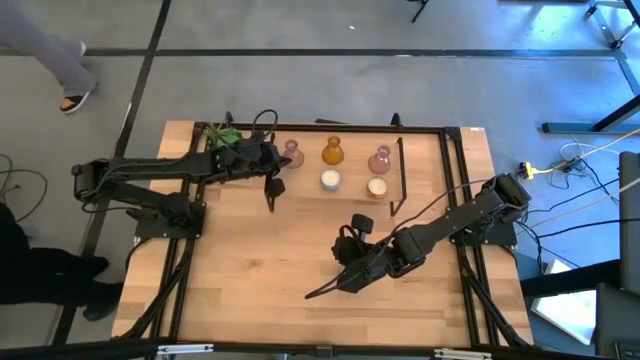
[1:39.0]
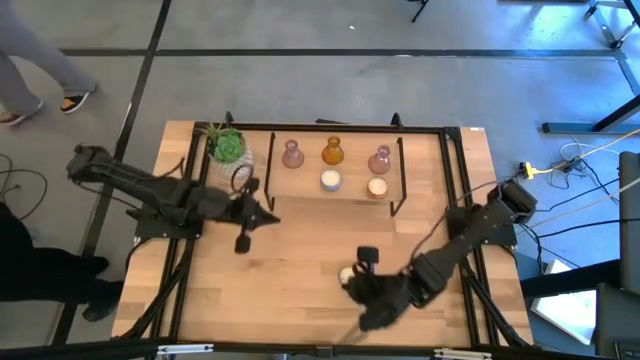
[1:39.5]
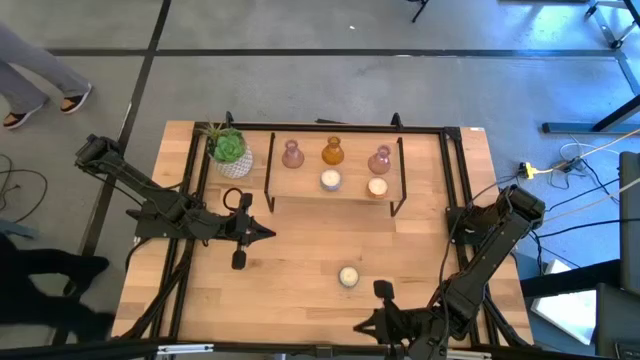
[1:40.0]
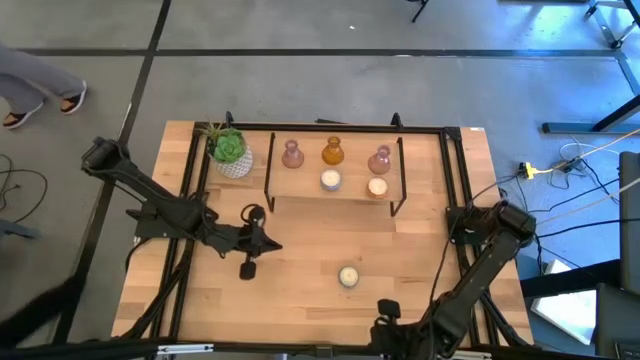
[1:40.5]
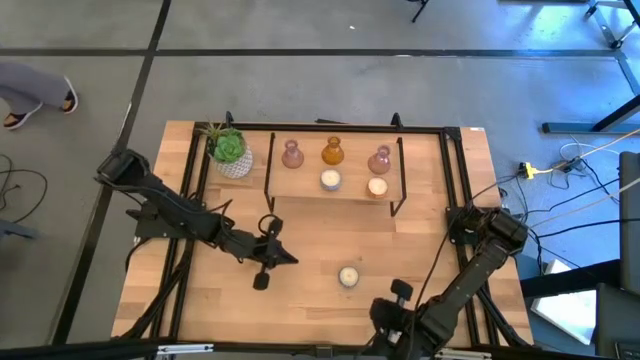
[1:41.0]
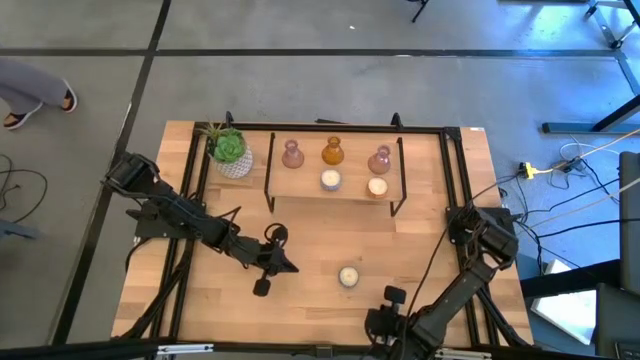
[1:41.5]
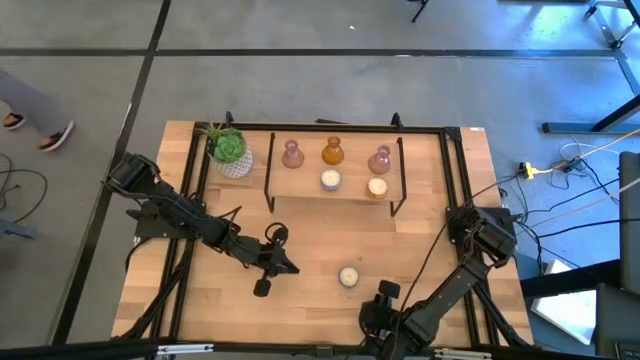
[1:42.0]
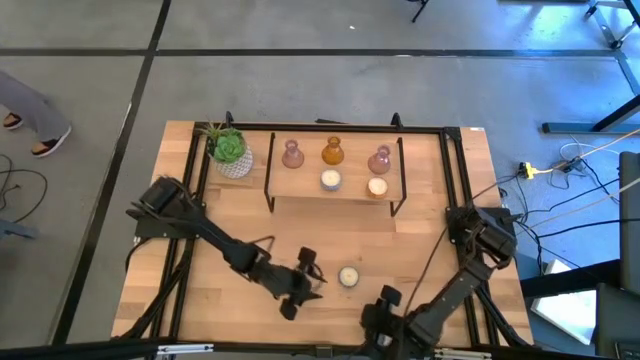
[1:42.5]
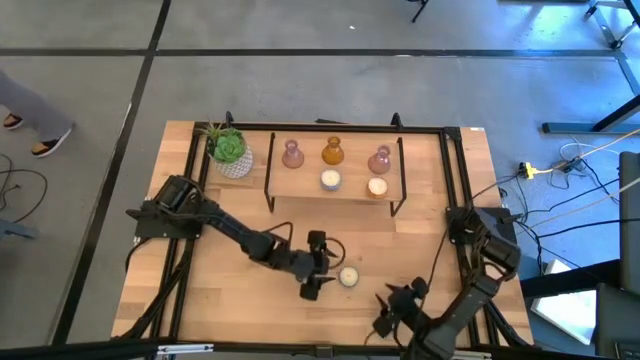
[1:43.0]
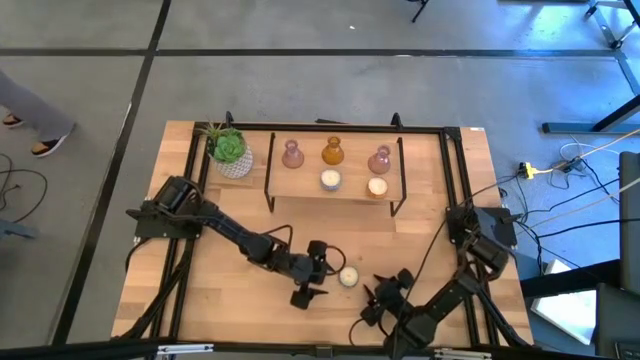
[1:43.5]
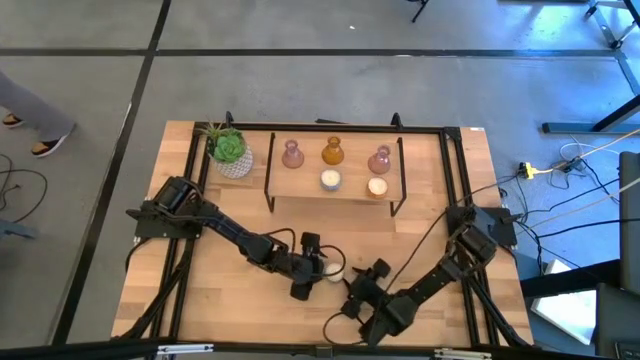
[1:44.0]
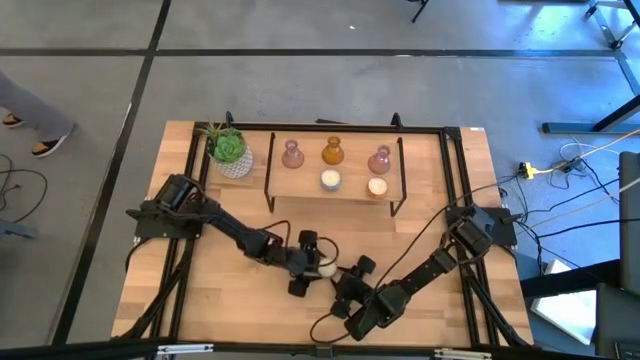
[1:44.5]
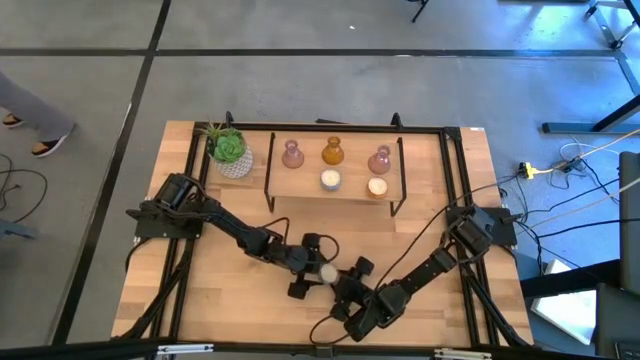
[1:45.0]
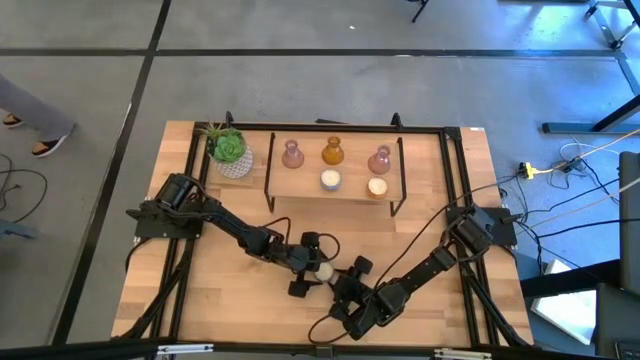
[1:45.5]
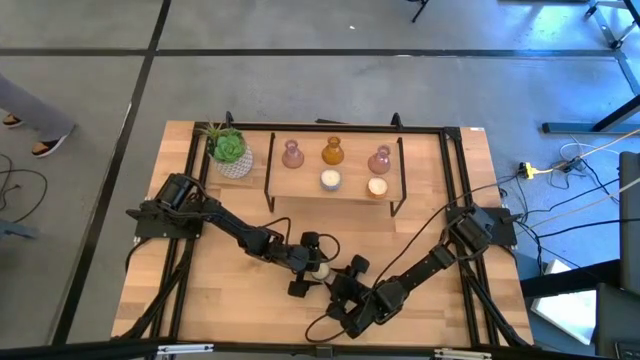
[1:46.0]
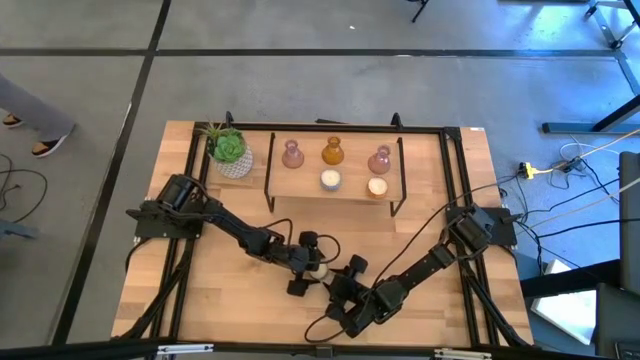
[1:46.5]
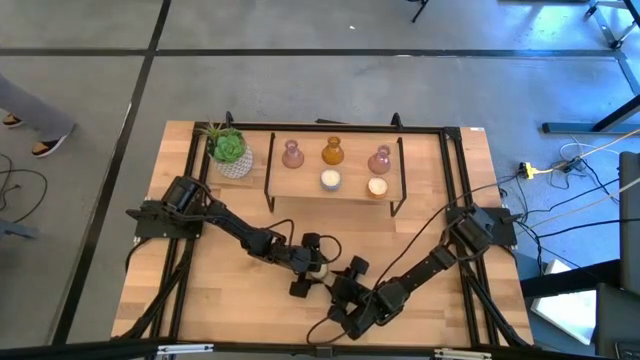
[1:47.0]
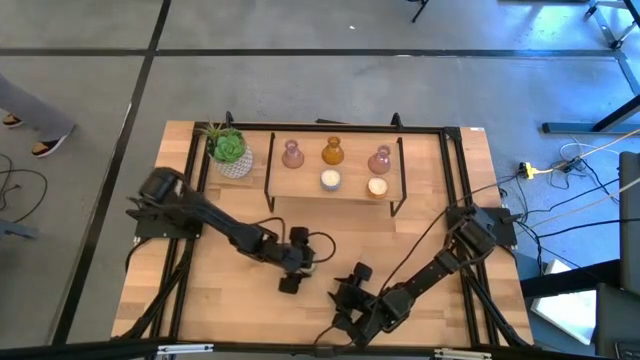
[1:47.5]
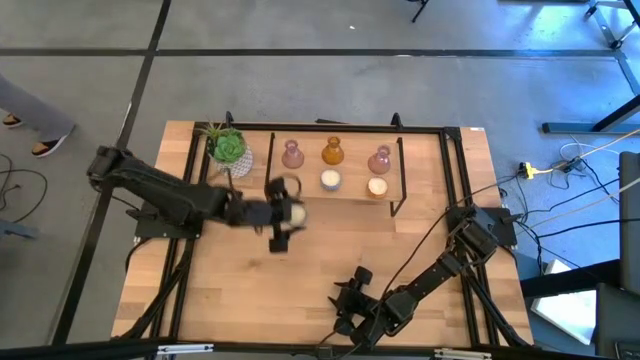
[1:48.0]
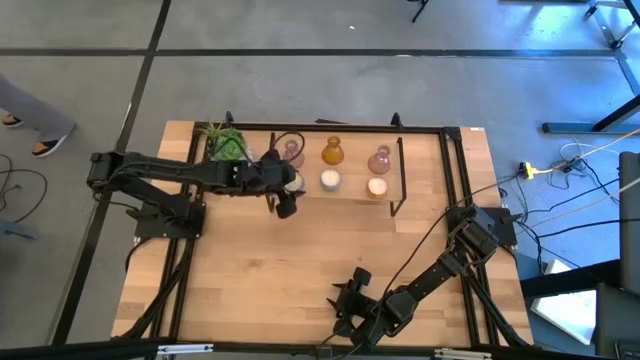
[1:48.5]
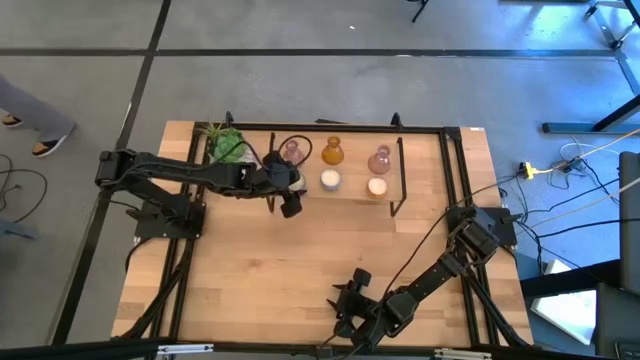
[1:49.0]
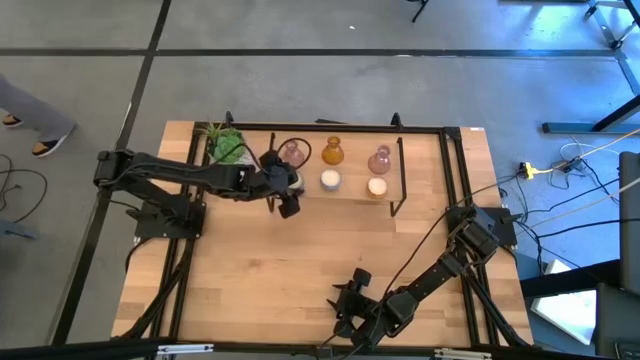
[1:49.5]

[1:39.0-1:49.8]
Task: Pick & Place candle stick holders
Put the blue scented candle on the shelf aligned with the light blue and blue scented candles

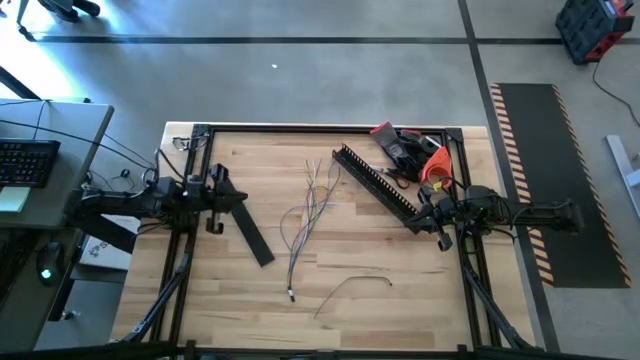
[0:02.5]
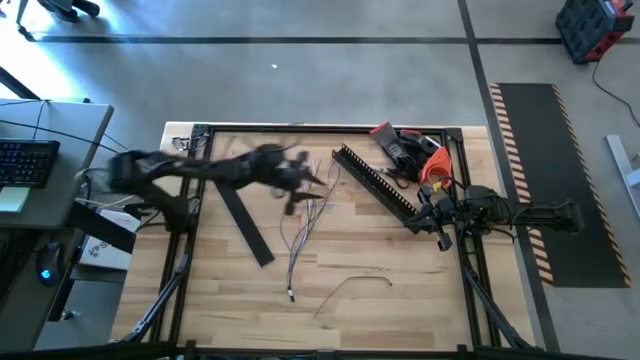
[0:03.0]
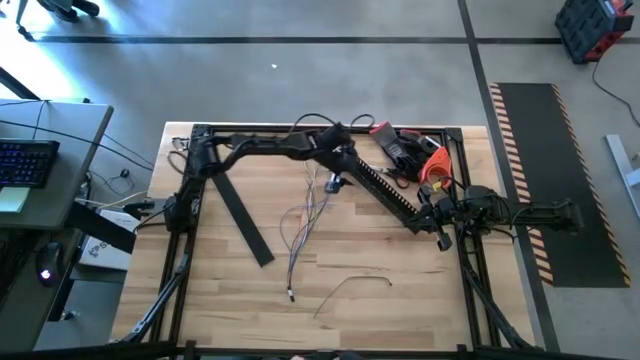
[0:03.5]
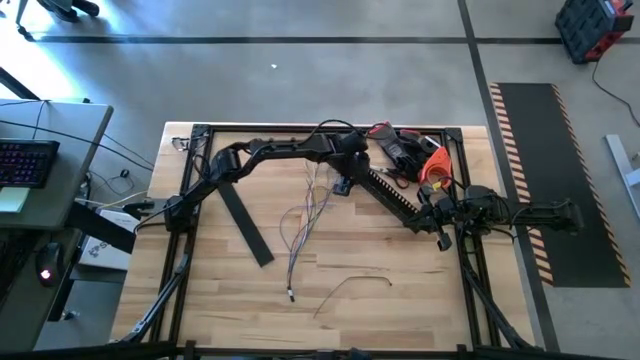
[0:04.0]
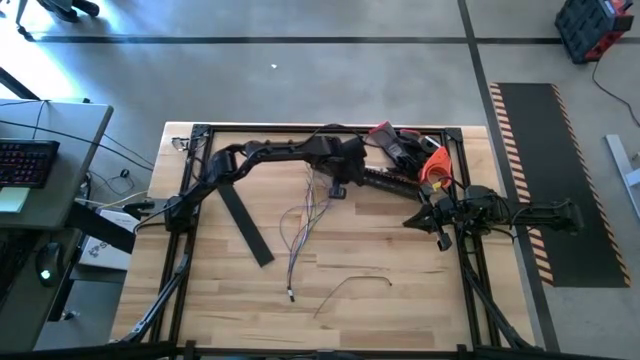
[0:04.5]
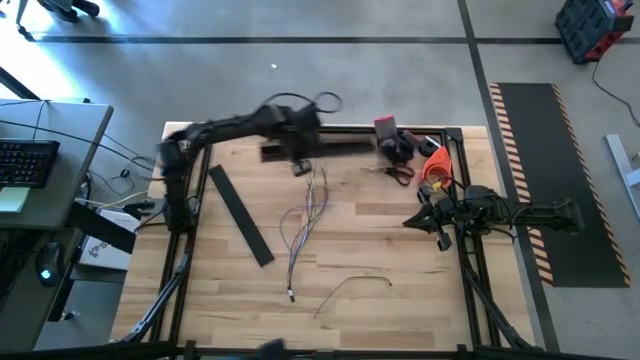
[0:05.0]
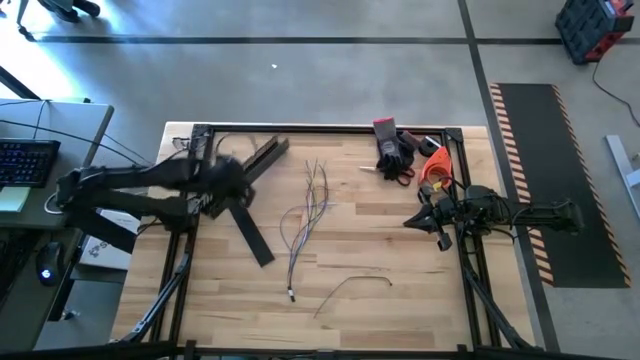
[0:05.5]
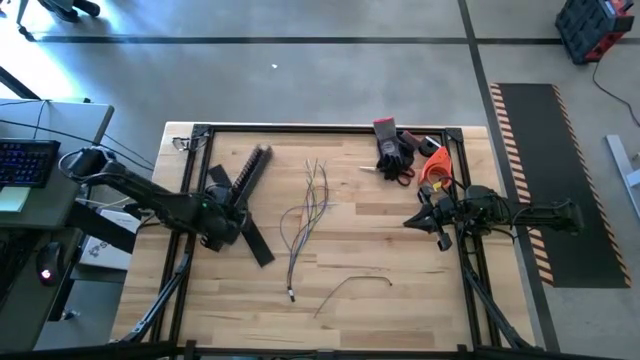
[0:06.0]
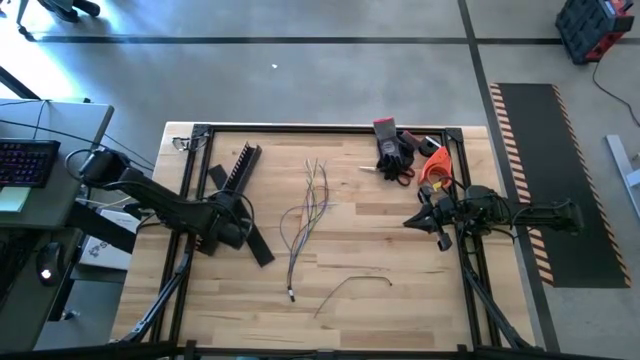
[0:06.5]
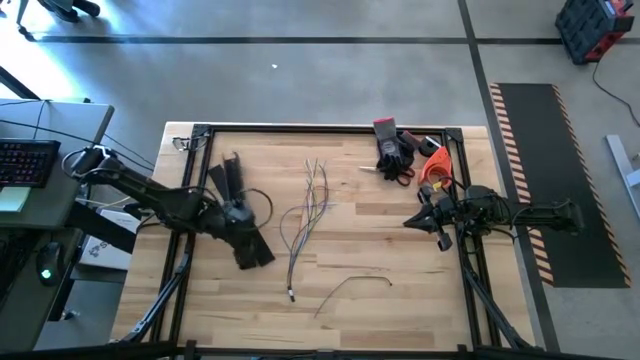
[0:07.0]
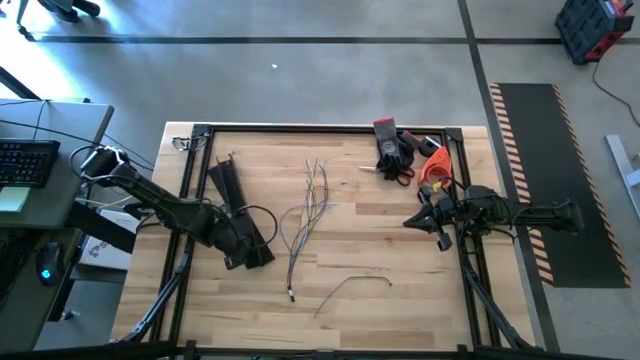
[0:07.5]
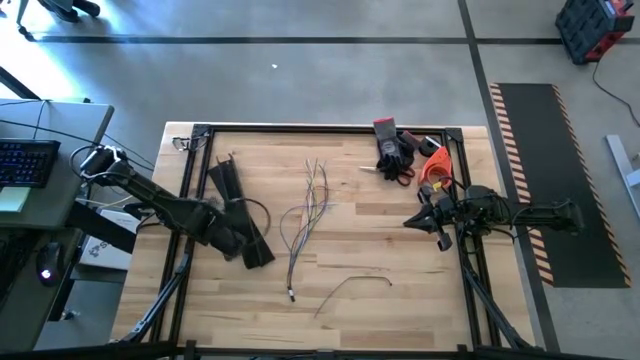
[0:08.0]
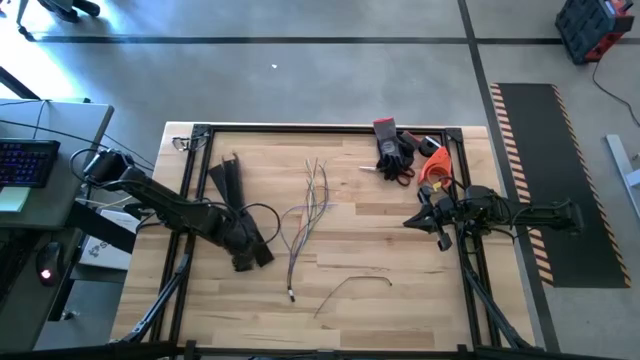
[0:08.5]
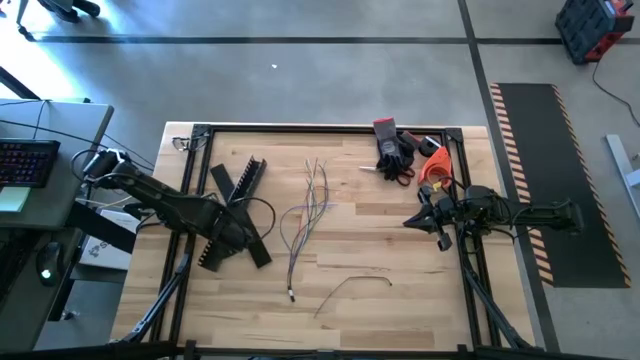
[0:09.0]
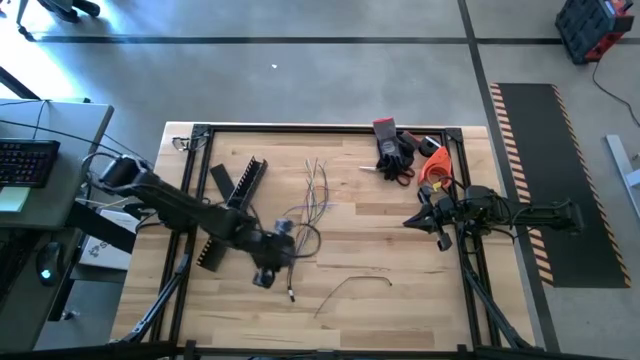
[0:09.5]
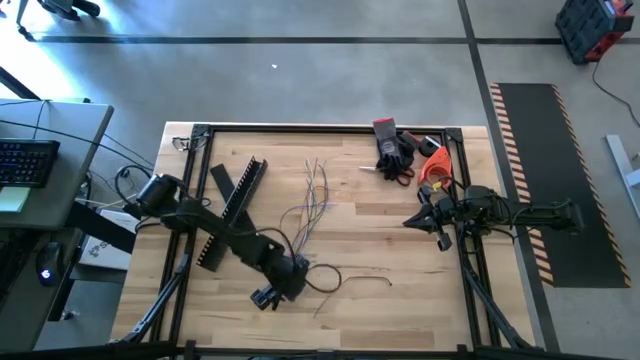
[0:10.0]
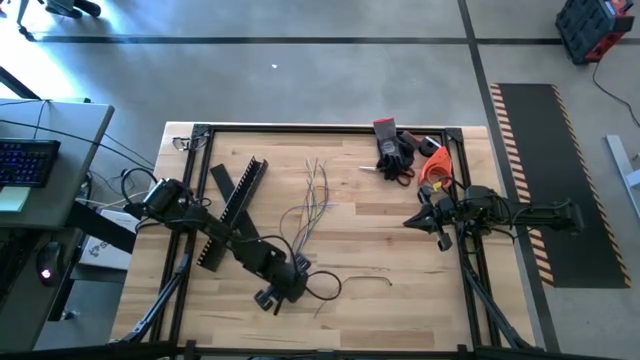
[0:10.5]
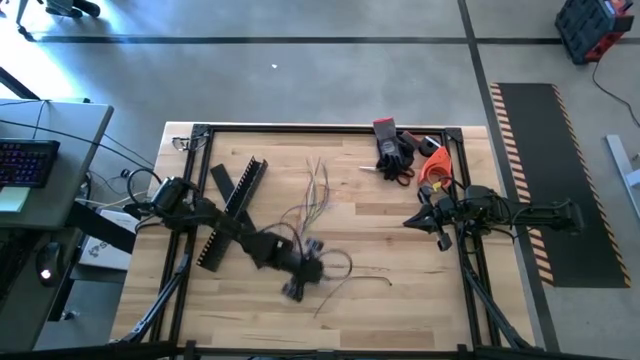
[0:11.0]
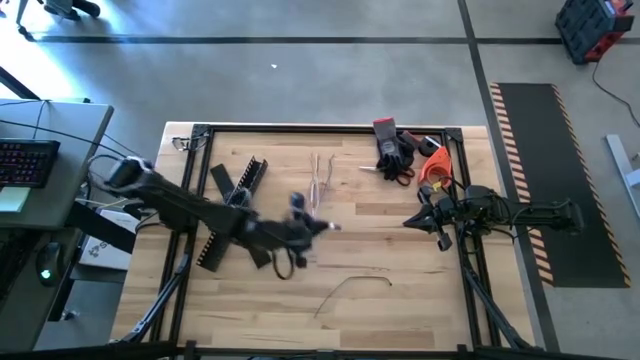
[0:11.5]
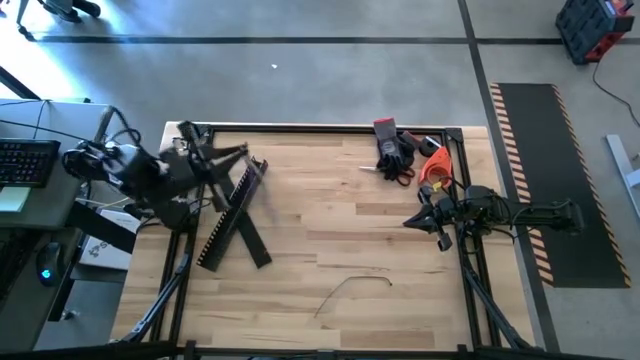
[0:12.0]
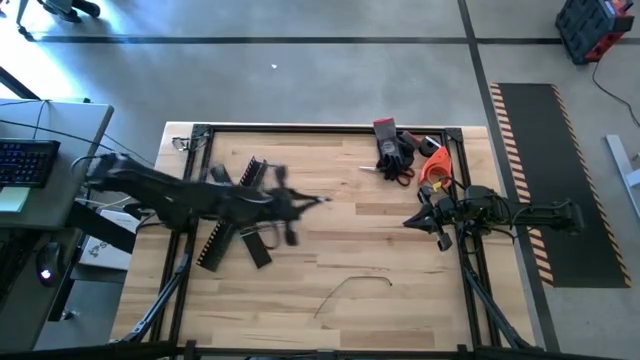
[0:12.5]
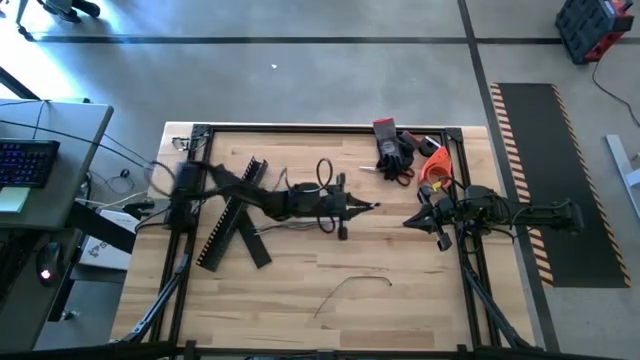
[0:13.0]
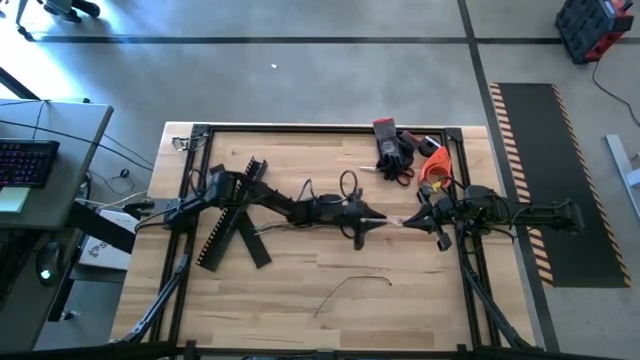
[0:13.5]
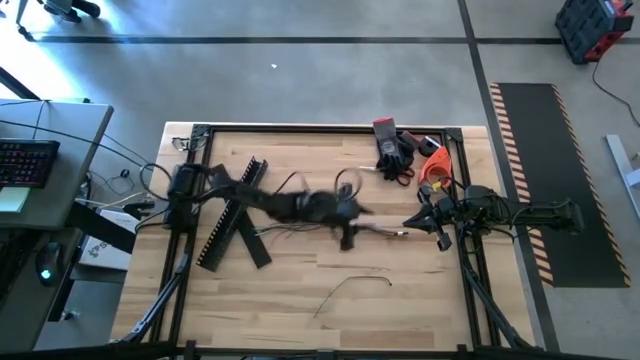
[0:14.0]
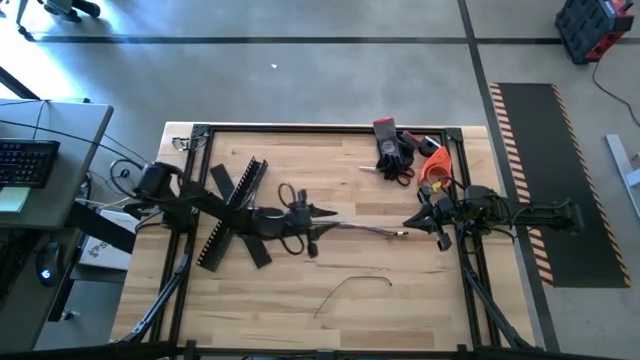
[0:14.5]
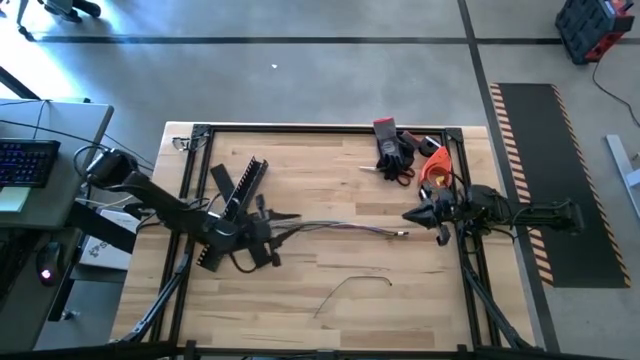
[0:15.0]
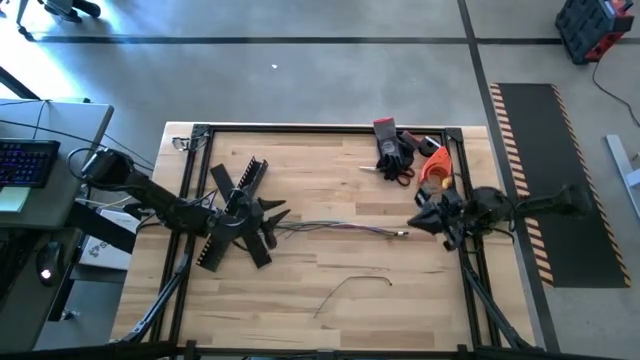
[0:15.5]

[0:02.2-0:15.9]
Task: Ziptie cables
Wrap the cable wires with the black zip tie
